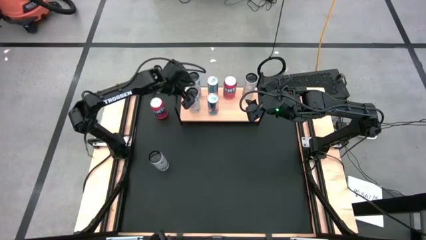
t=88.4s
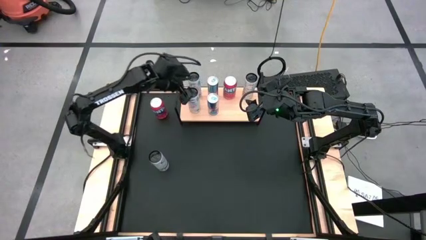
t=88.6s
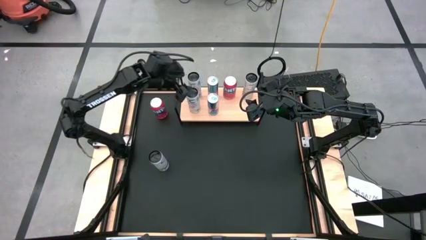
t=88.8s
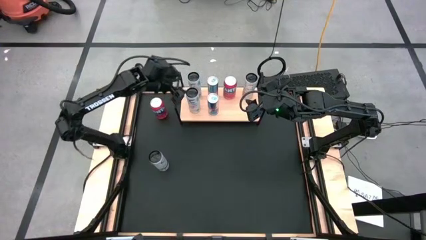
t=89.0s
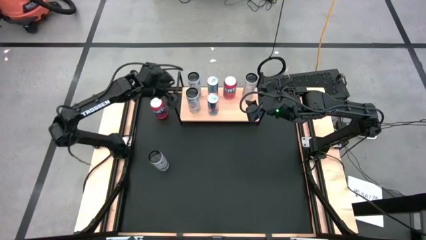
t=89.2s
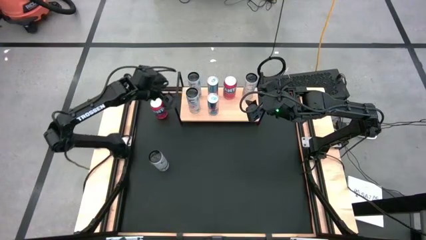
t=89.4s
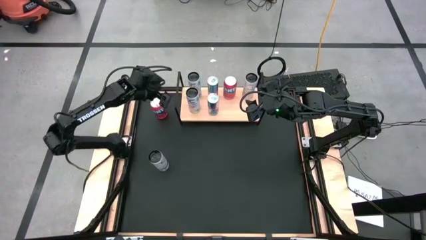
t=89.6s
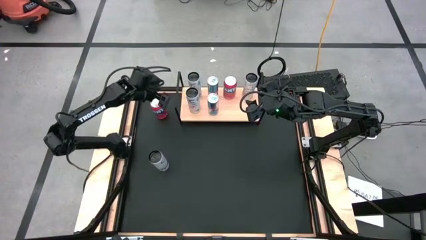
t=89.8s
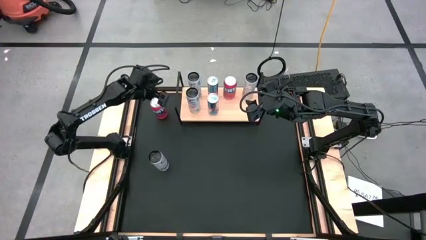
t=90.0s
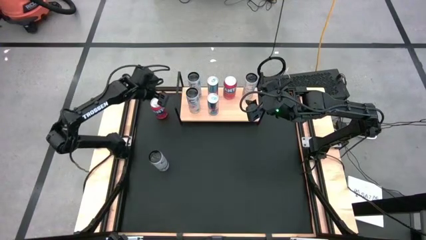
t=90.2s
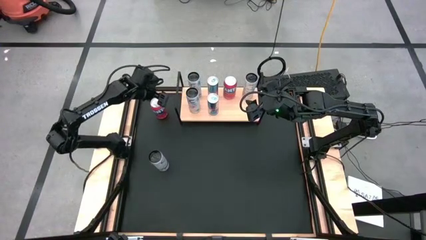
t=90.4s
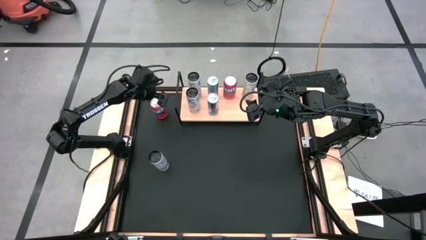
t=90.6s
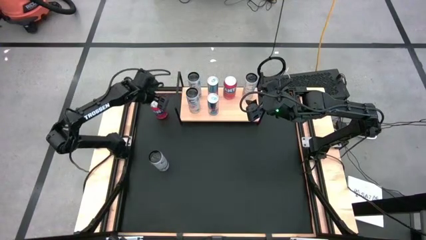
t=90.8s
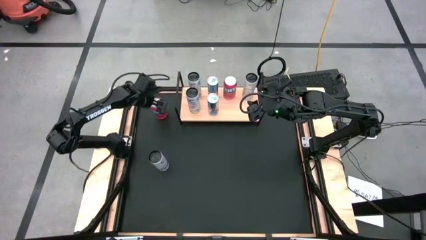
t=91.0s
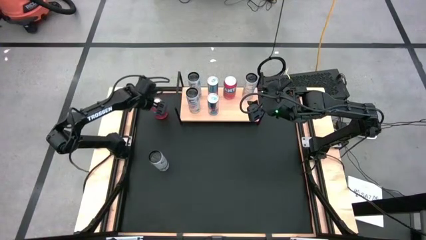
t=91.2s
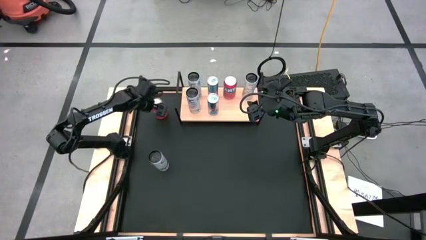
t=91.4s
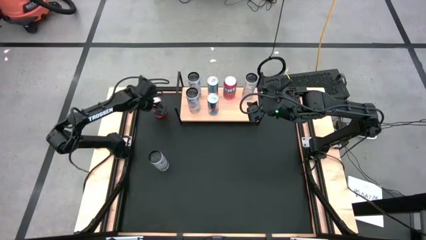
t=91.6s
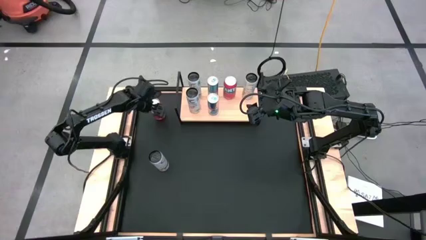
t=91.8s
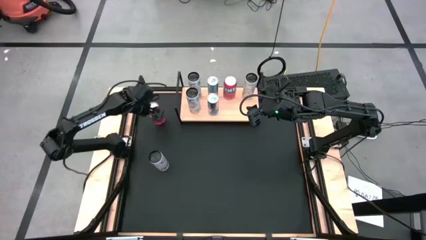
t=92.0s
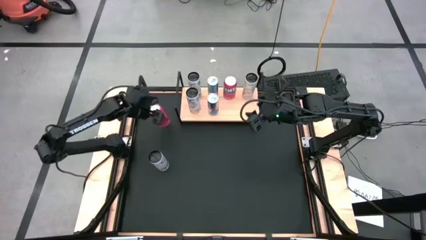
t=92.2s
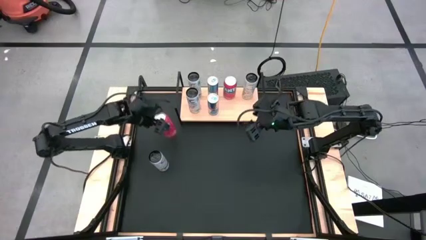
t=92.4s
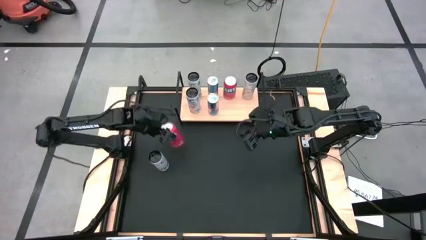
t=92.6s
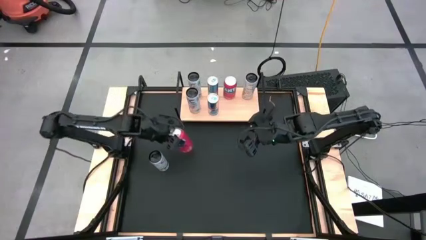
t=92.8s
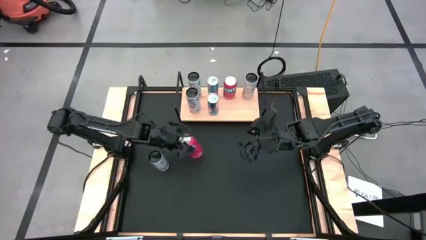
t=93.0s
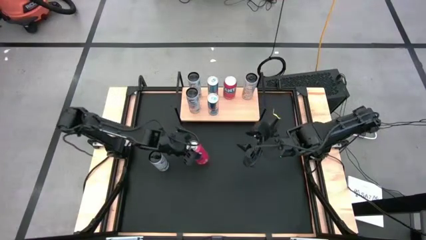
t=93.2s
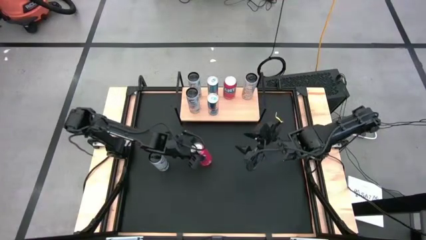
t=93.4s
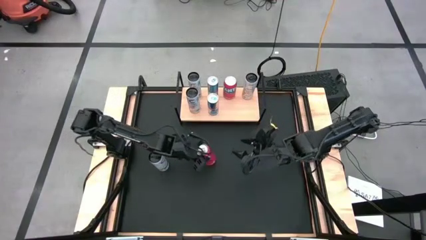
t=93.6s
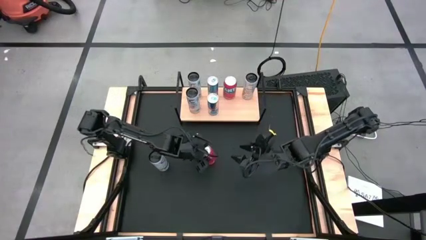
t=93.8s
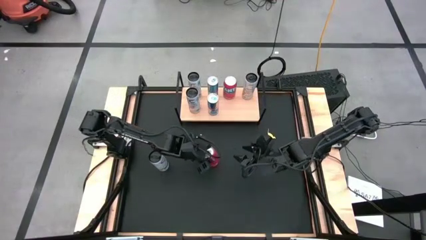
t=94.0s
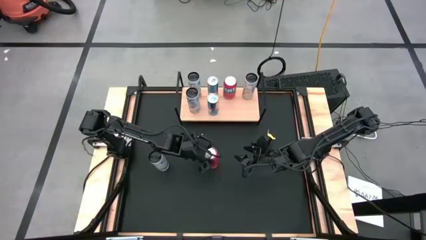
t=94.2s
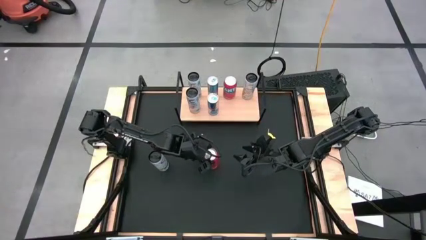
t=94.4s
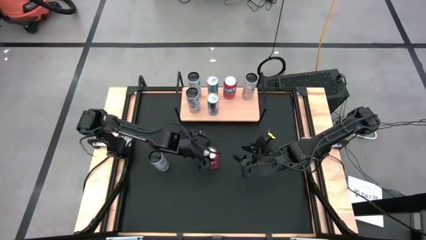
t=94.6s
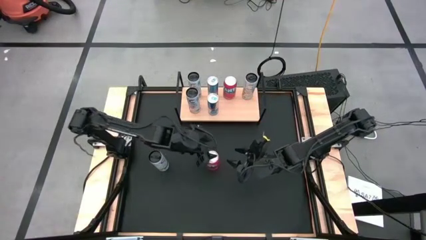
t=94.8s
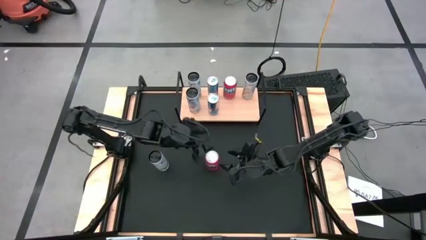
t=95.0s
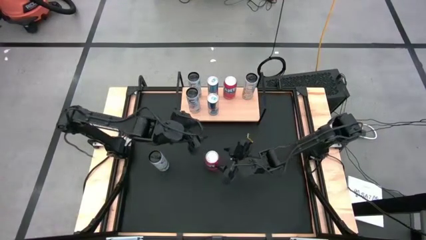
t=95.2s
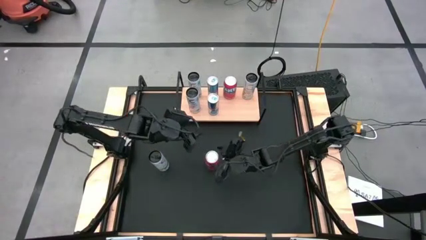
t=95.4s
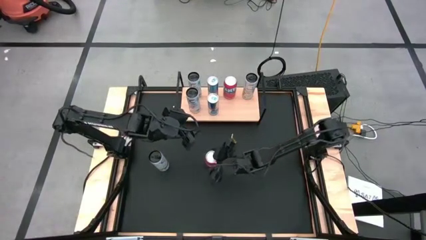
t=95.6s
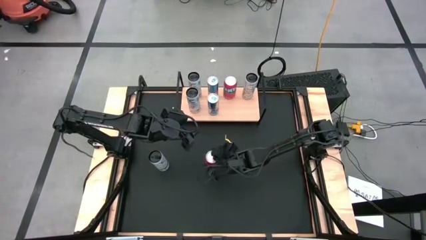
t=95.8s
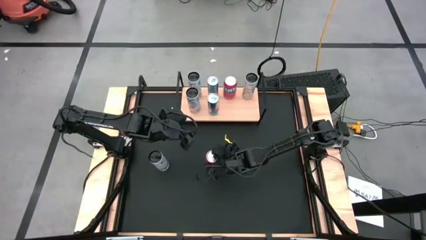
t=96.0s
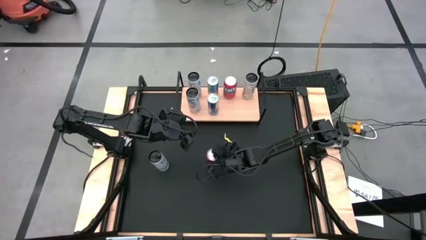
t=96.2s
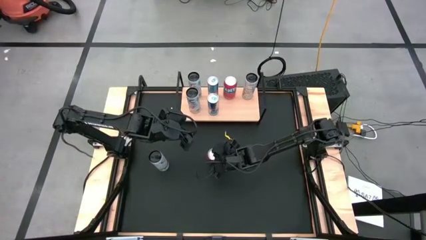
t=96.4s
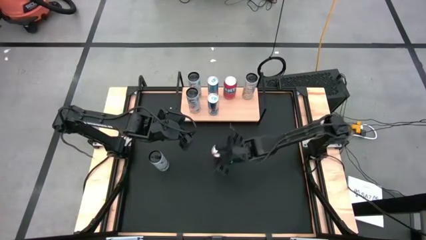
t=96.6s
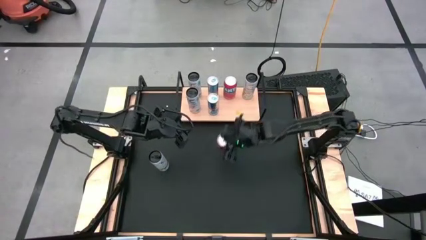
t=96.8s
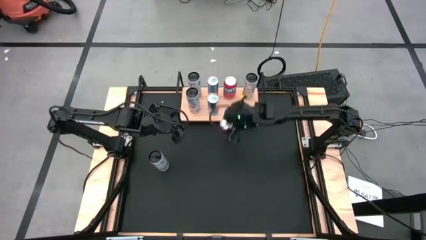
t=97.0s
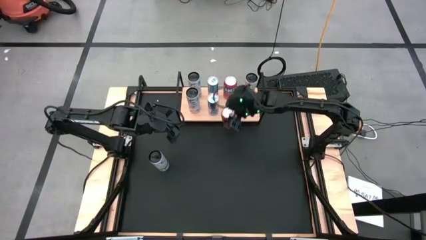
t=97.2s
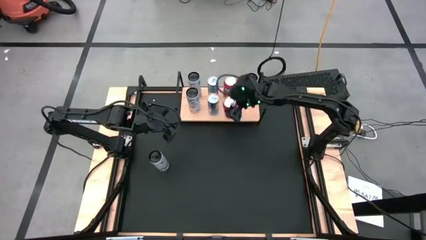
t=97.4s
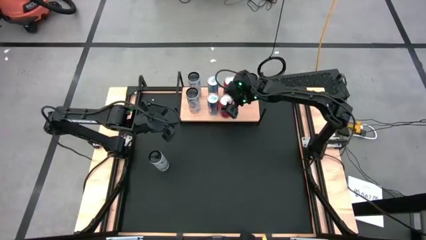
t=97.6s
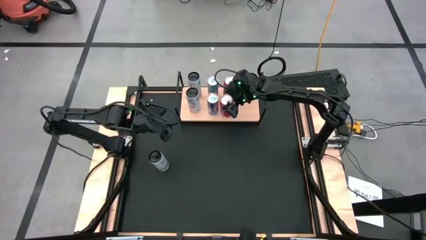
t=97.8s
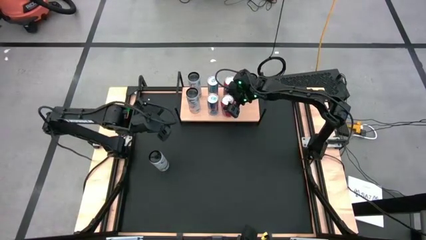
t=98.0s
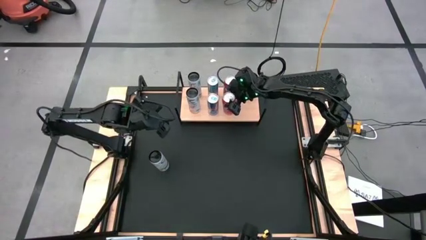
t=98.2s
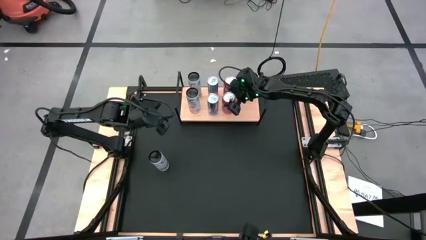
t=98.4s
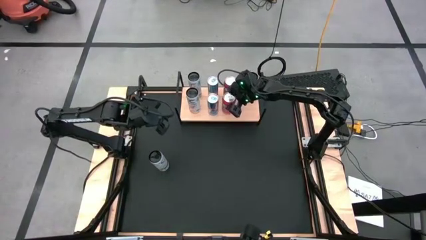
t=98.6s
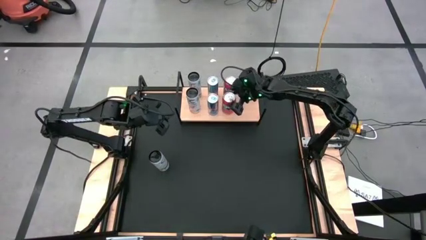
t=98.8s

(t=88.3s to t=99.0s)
Task: Place canned beverage on shelf
Put the red soda can on the shelf aligned with the other red soda can

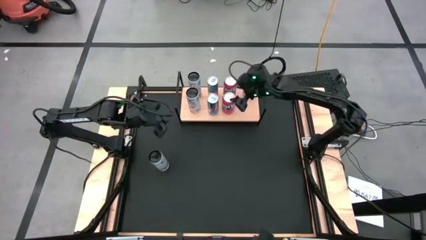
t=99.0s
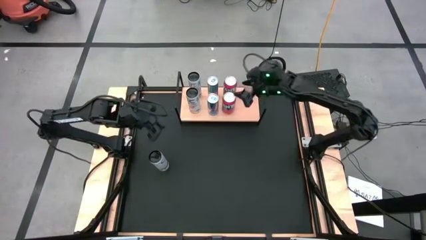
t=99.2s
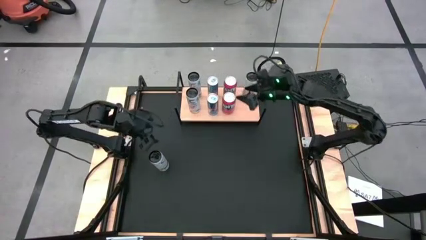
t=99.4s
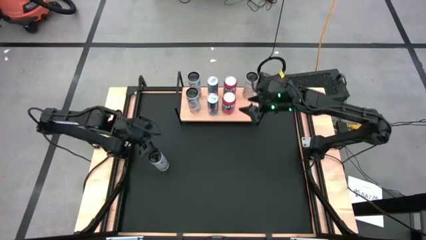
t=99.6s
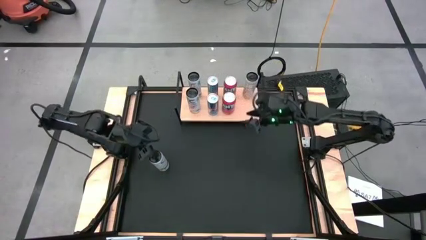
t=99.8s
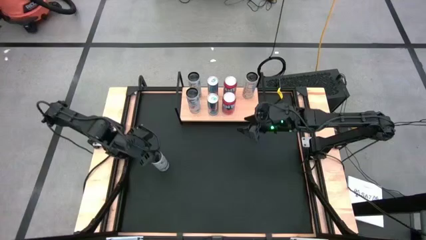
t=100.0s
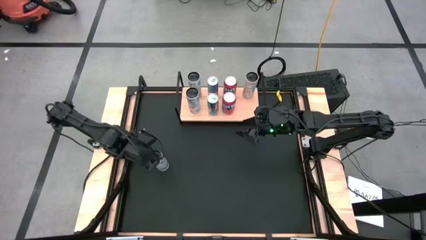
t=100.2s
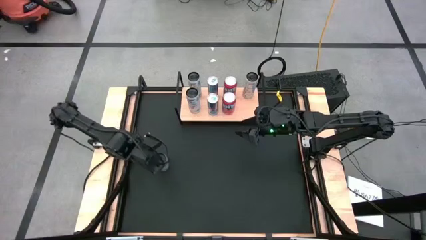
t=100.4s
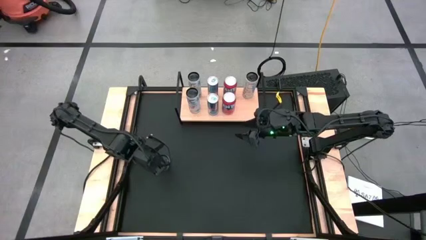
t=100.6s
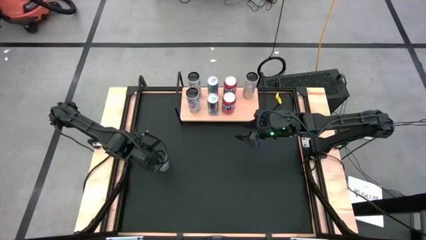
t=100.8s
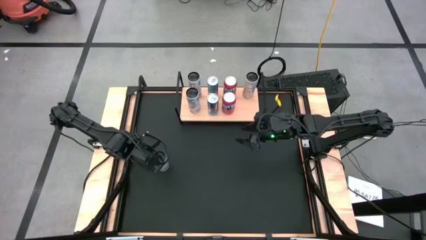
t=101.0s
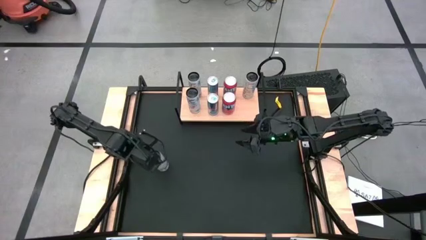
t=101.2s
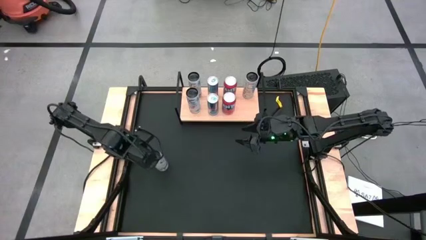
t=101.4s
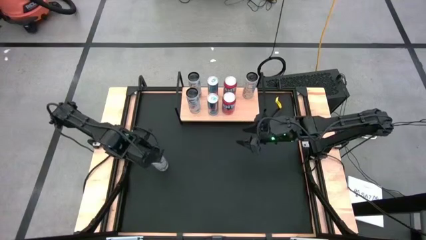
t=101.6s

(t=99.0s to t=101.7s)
Put the white-yellow soda can on the shelf aligned with the other white-yellow soda can
